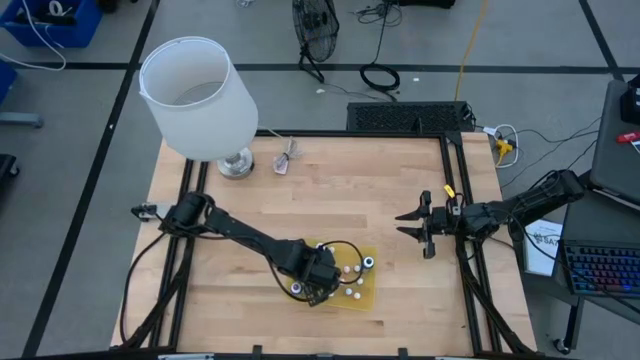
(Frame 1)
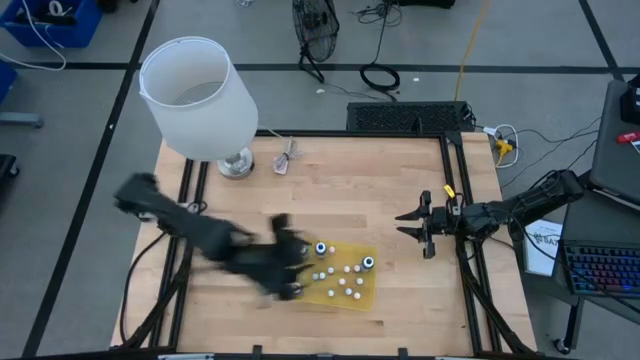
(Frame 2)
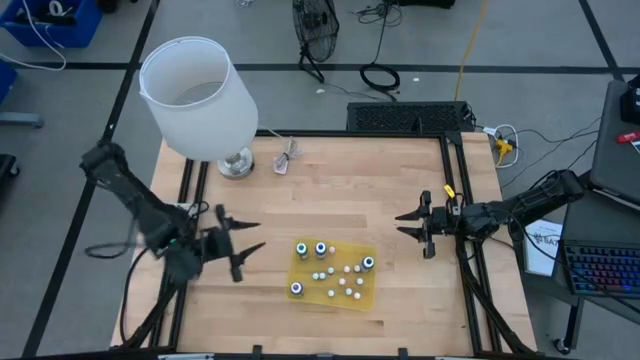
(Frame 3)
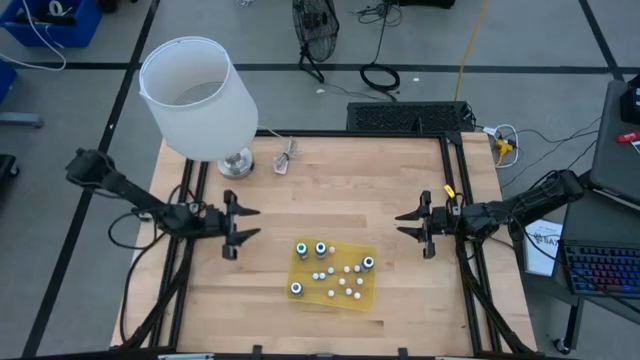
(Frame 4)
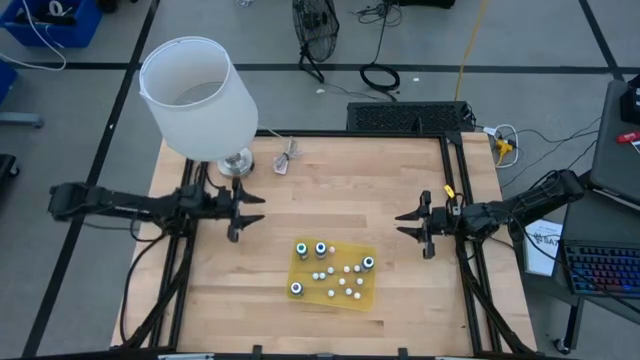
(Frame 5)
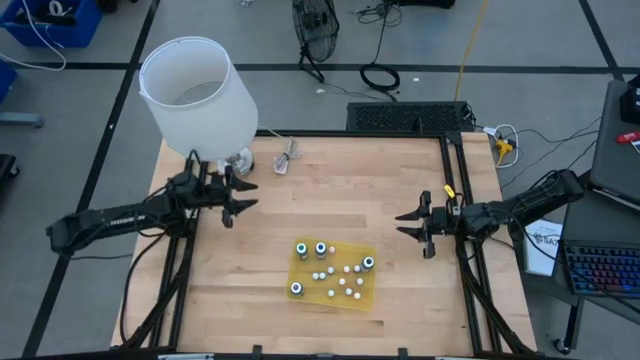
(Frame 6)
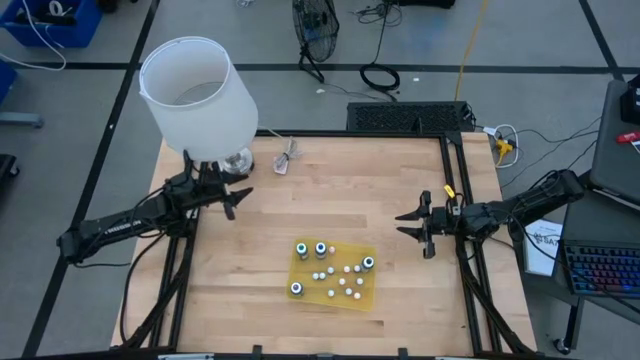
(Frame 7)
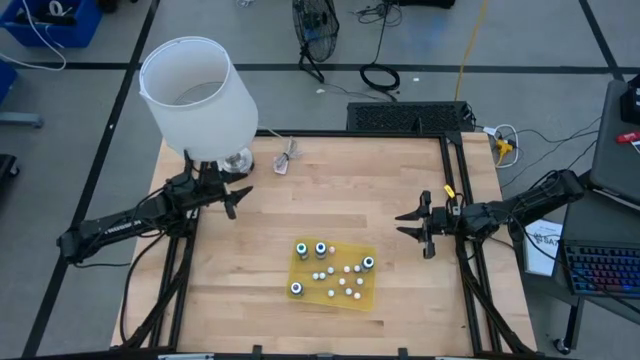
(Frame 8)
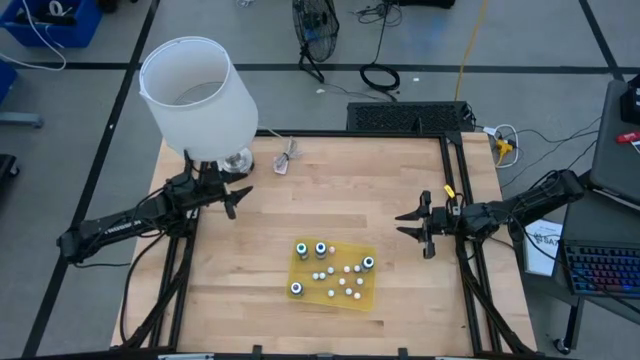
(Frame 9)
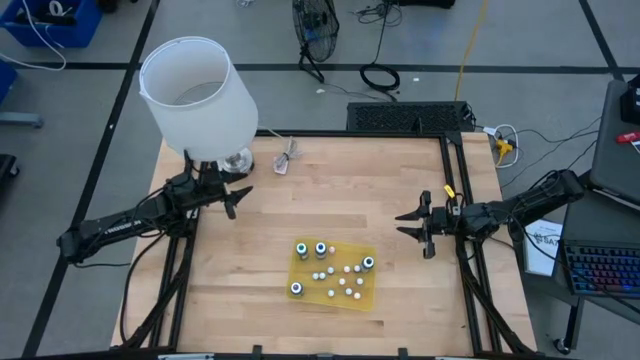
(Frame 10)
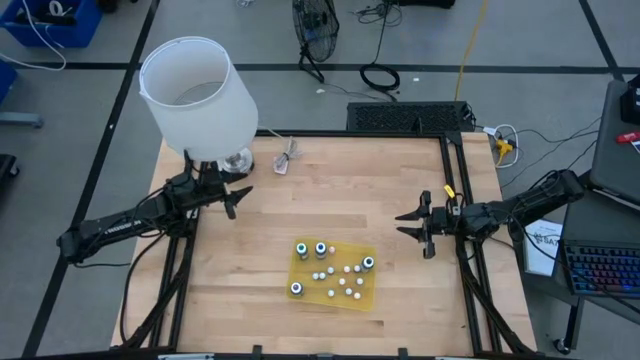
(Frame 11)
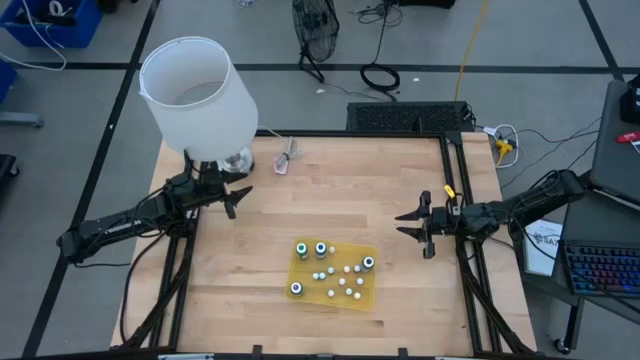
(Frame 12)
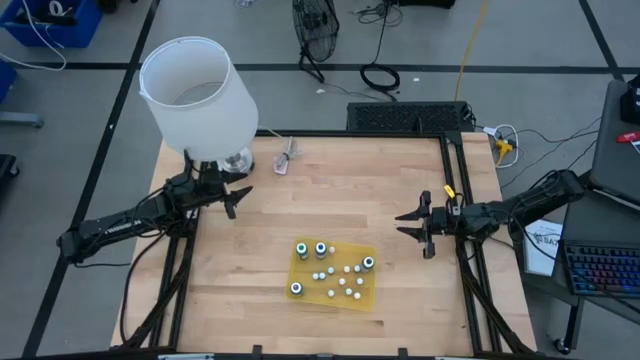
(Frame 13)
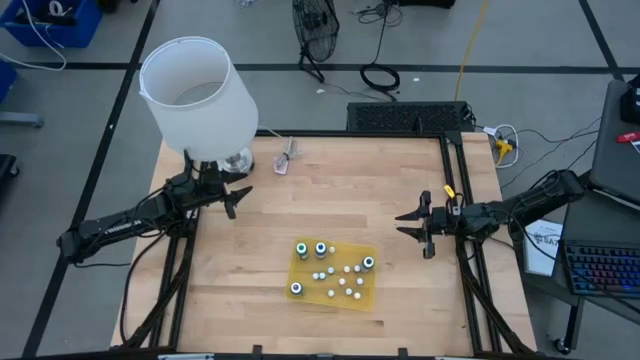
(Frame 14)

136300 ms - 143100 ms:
Task: Pick & Place food coloring
Return to Home Position

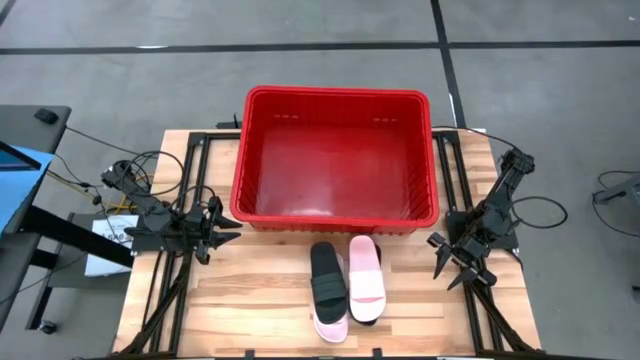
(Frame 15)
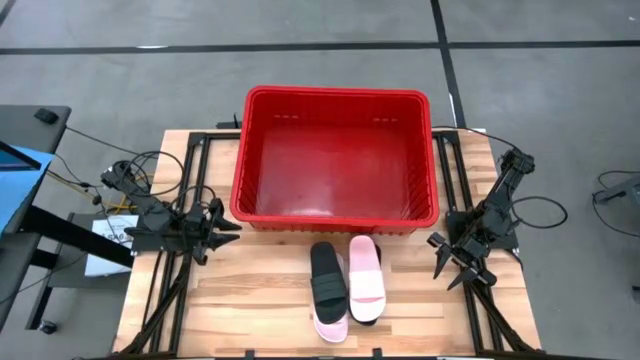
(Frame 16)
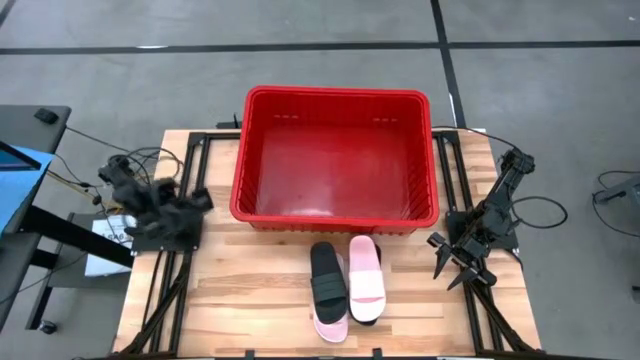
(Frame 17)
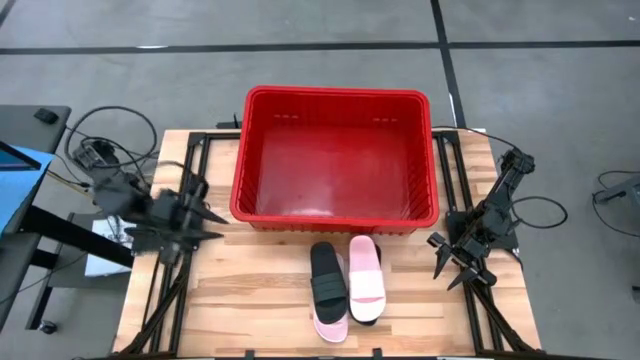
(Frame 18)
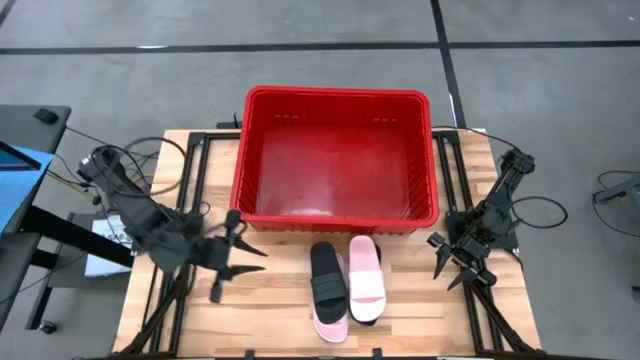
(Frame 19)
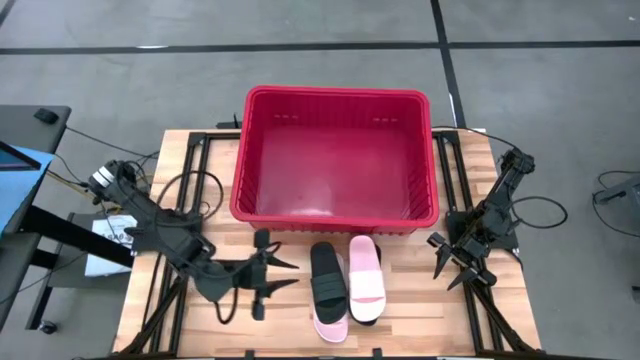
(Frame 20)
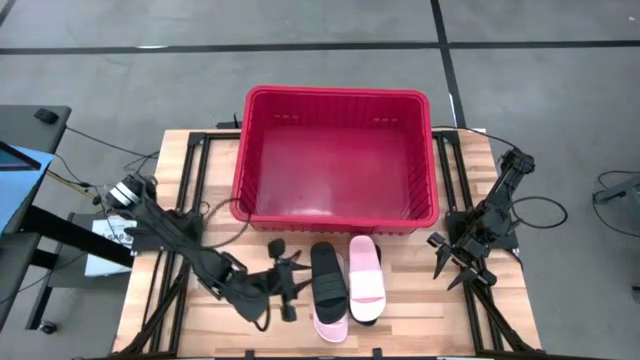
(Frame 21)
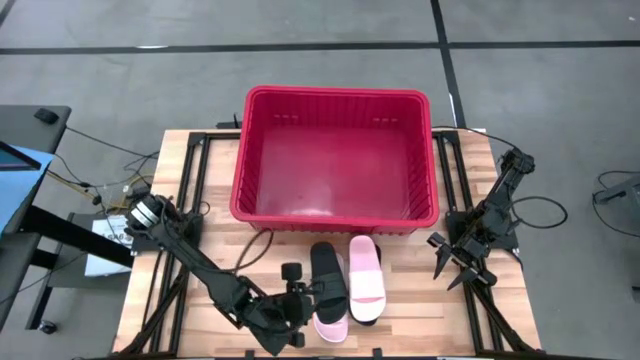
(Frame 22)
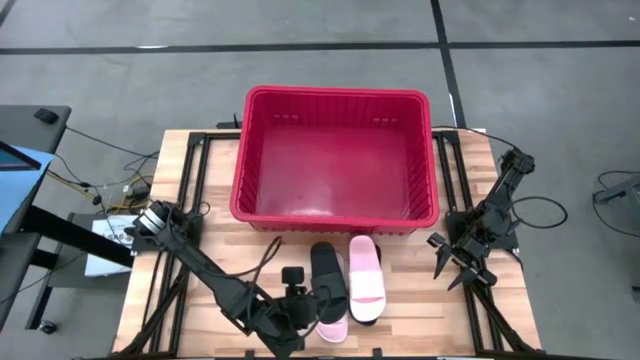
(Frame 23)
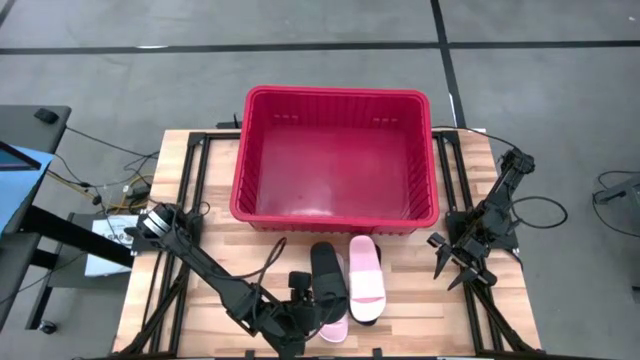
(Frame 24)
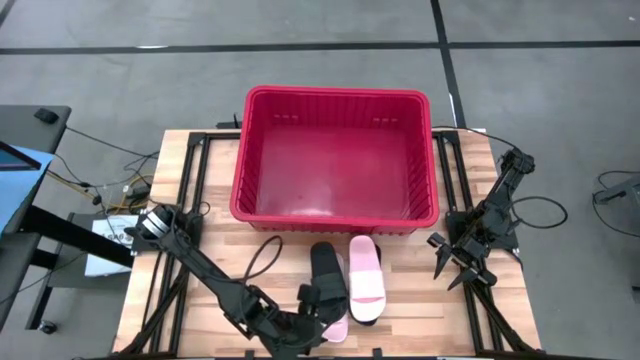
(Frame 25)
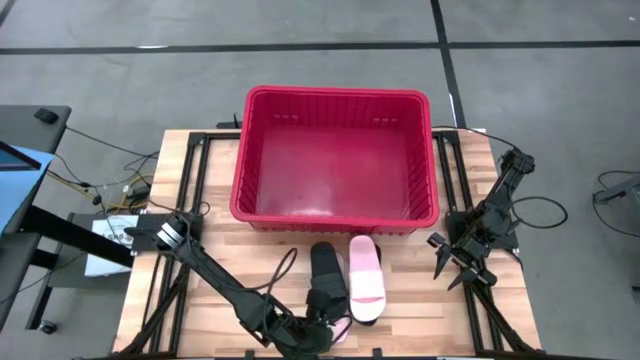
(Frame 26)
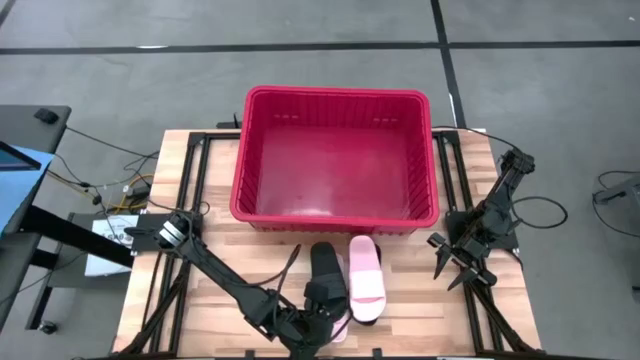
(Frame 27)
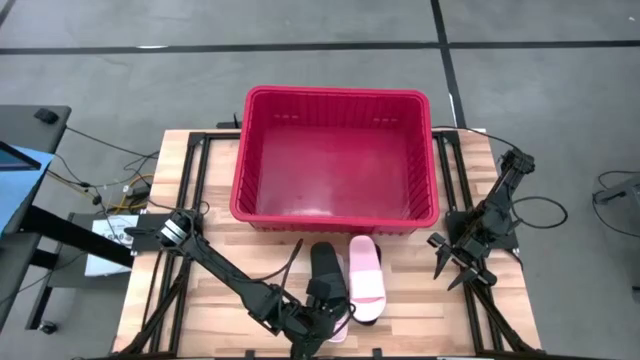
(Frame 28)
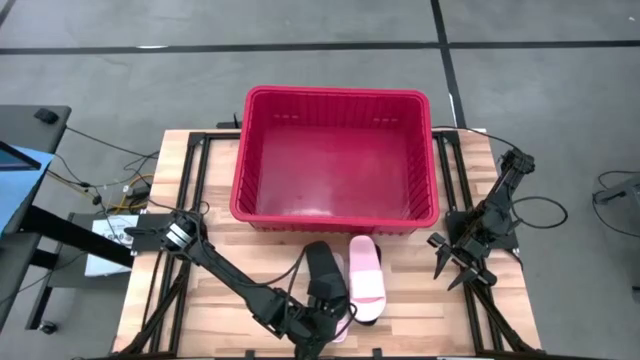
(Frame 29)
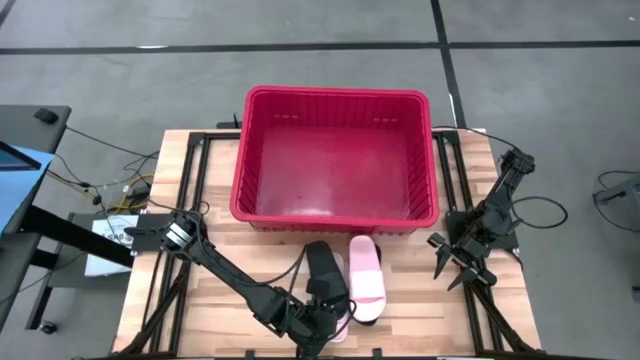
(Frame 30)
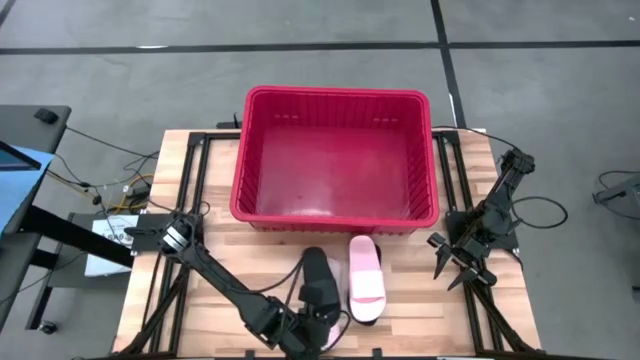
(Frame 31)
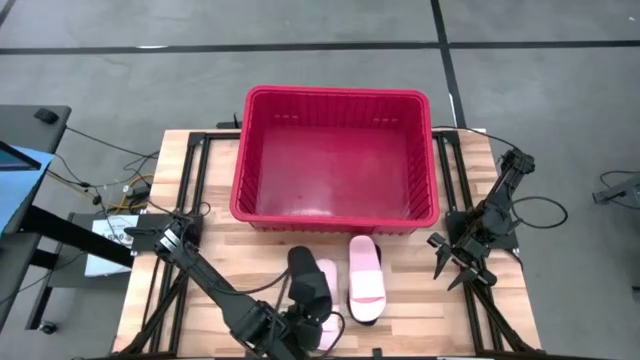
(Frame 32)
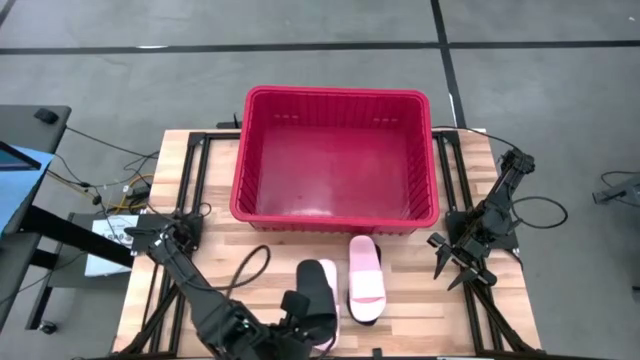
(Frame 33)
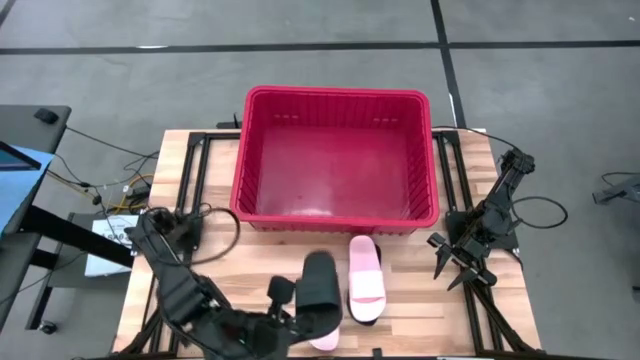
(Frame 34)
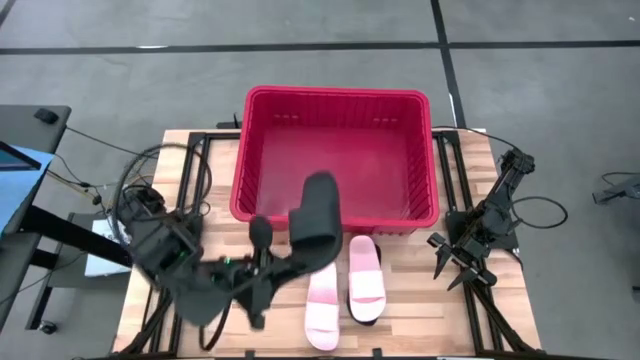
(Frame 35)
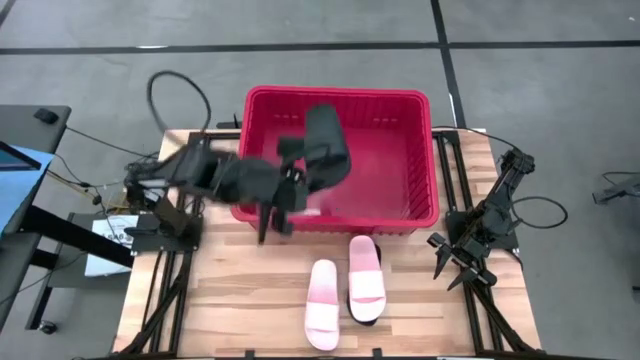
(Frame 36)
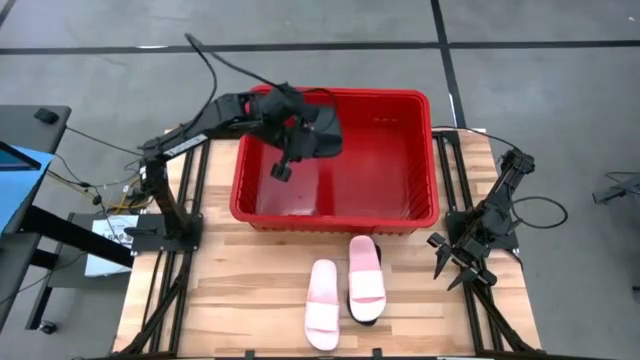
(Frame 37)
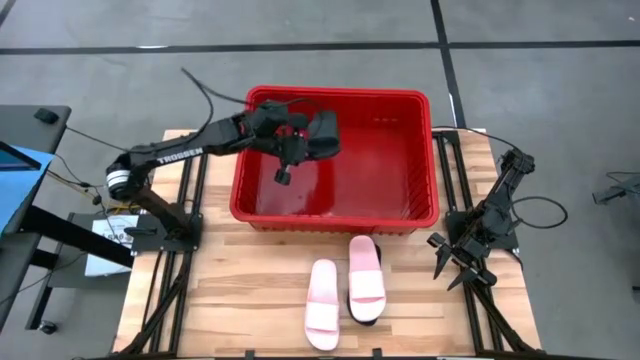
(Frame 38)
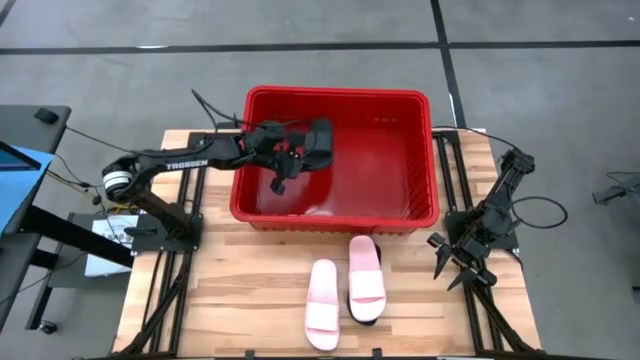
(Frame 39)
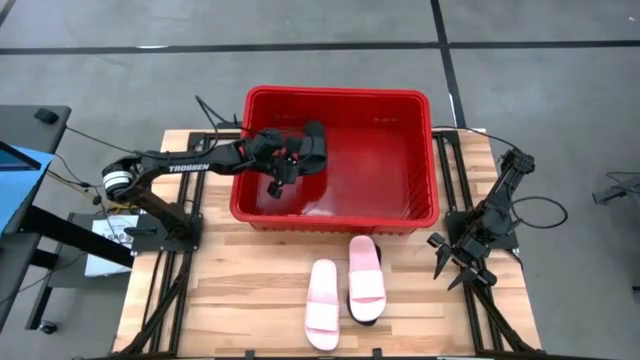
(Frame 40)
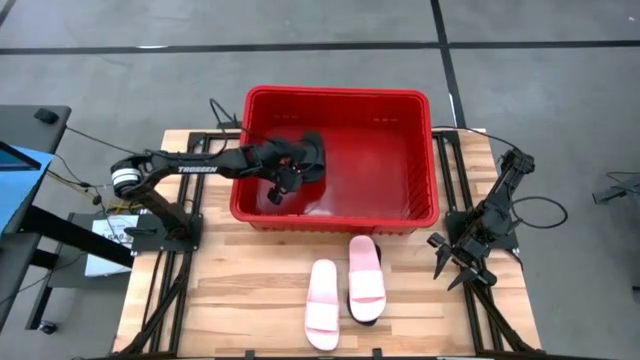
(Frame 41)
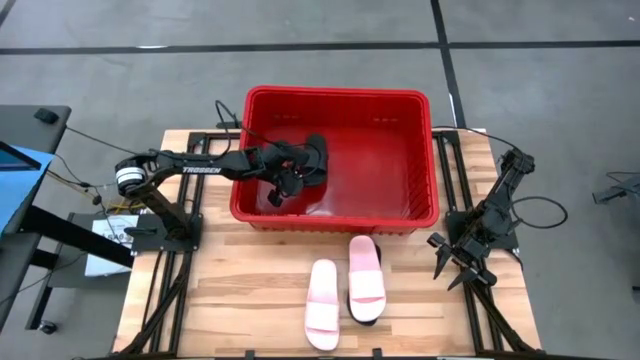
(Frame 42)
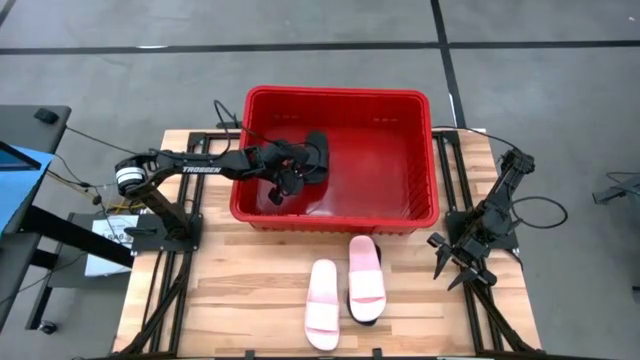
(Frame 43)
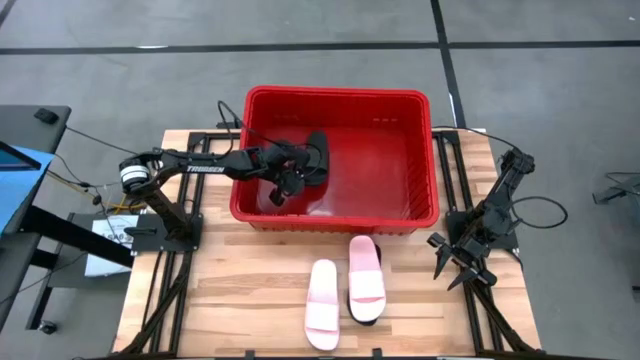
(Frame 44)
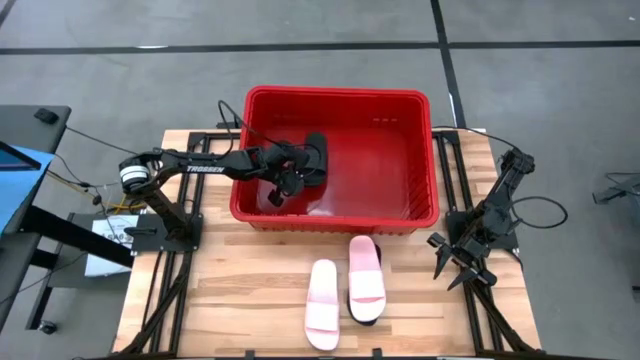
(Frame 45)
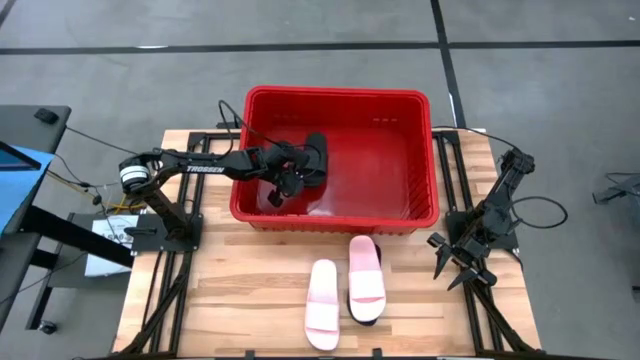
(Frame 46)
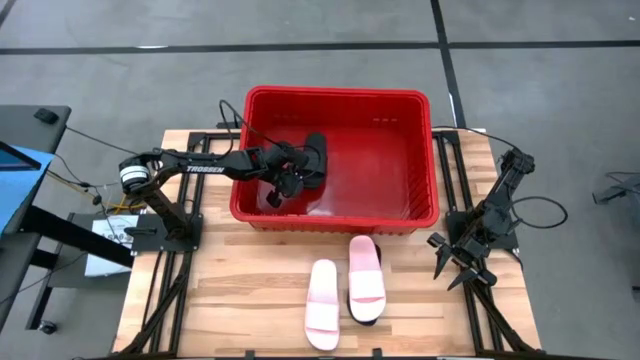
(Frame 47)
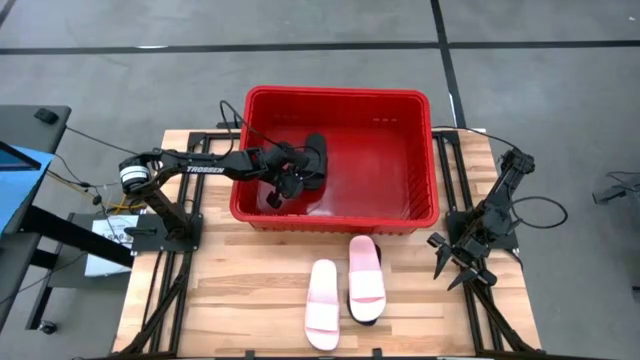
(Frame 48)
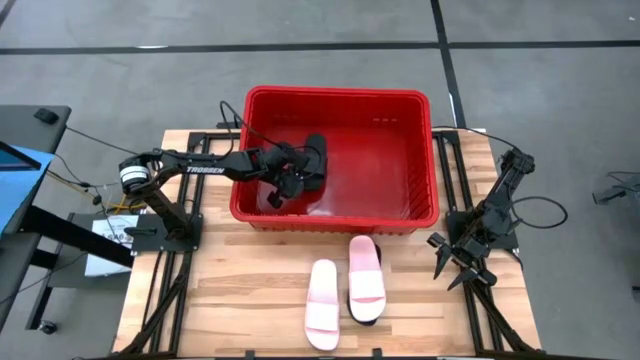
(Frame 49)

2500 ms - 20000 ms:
Task: Pick and place slides into bin
Put the left black slide into the red container
